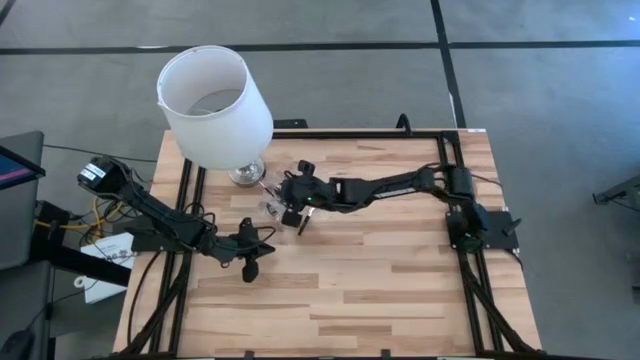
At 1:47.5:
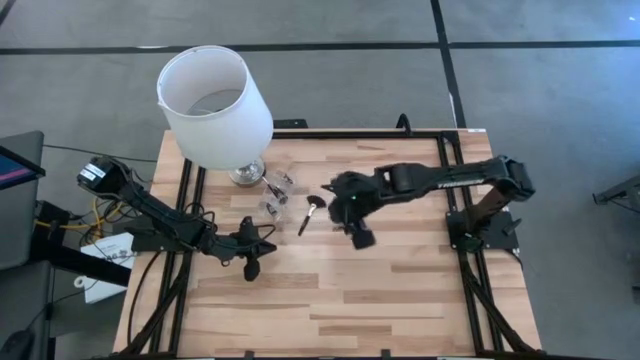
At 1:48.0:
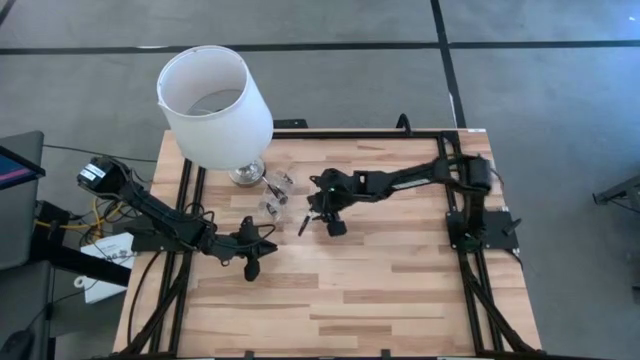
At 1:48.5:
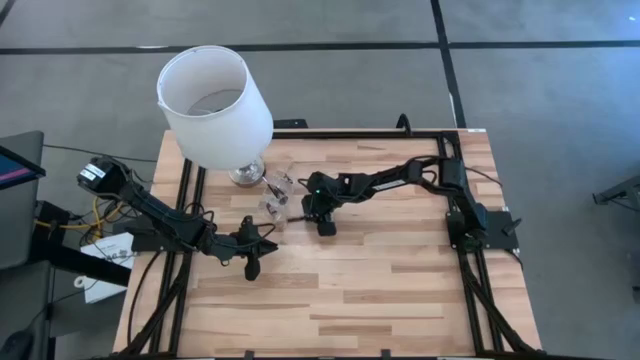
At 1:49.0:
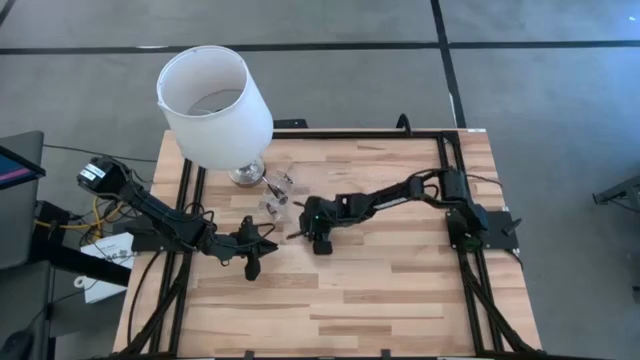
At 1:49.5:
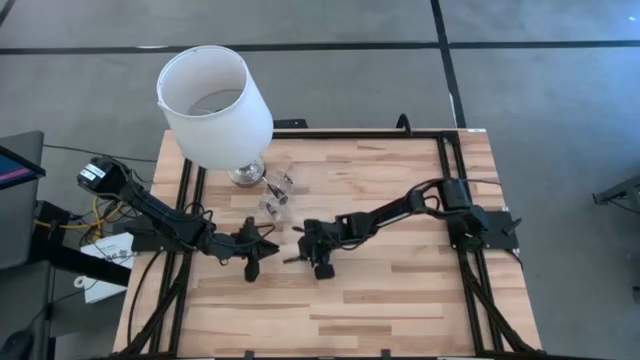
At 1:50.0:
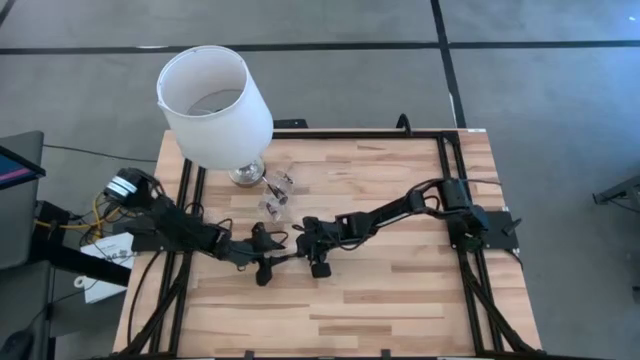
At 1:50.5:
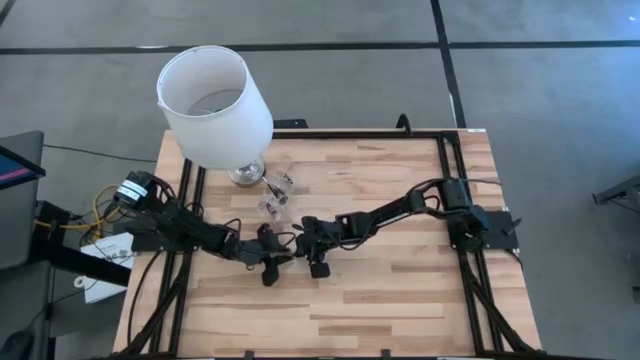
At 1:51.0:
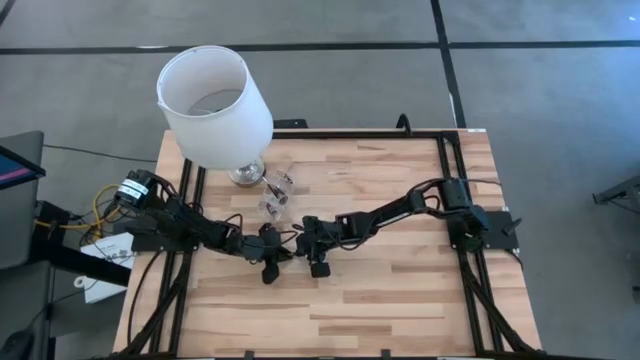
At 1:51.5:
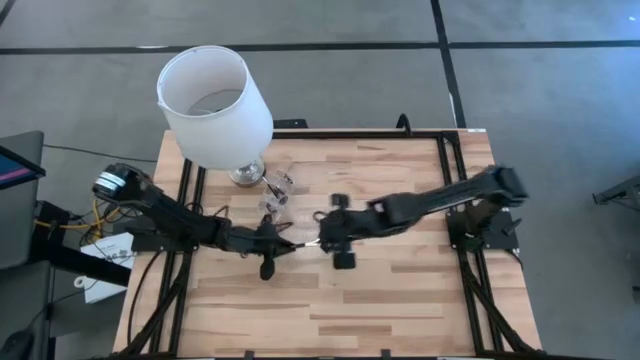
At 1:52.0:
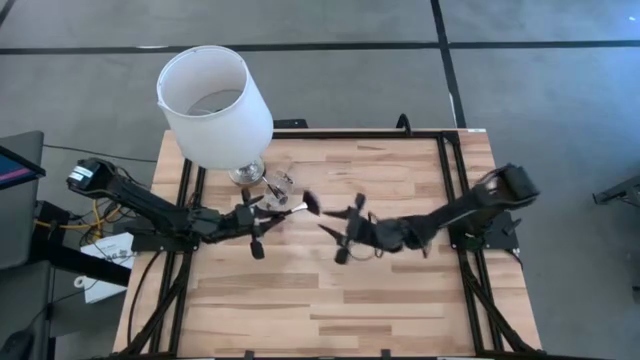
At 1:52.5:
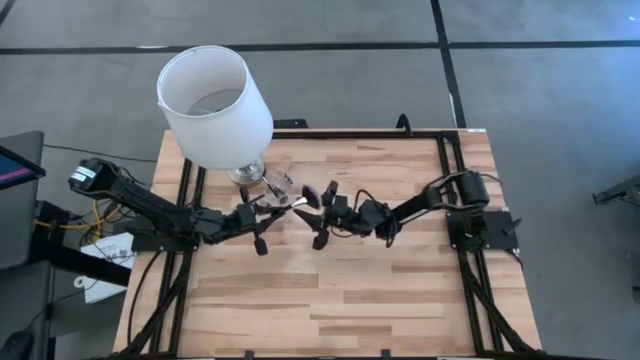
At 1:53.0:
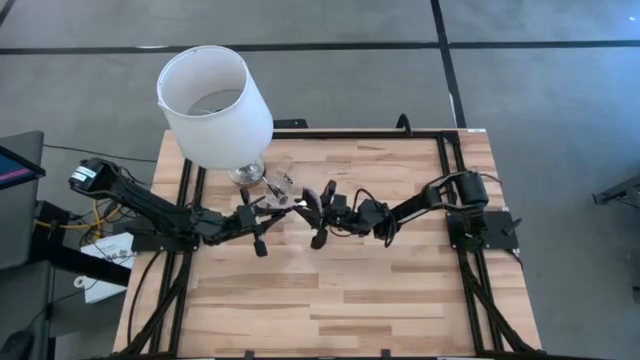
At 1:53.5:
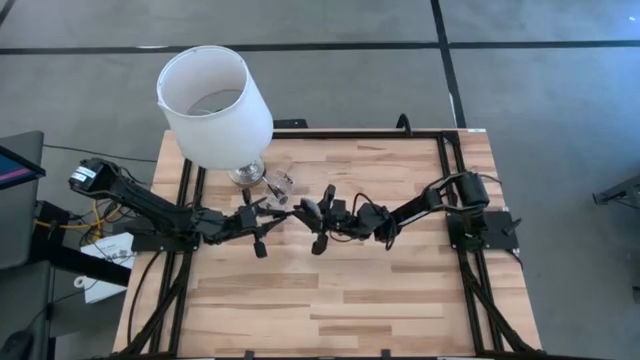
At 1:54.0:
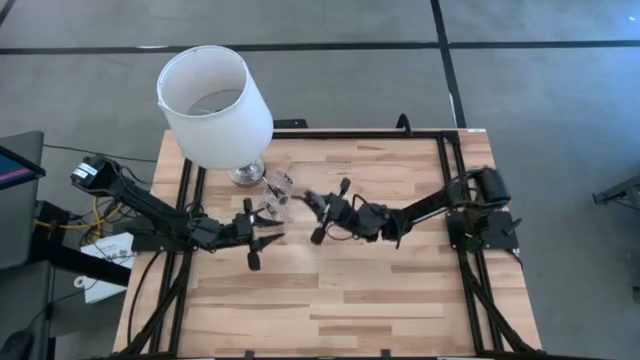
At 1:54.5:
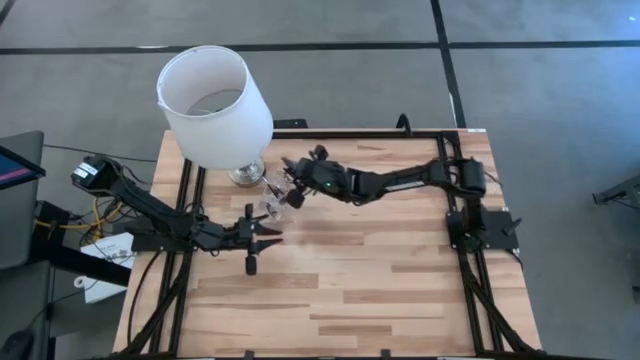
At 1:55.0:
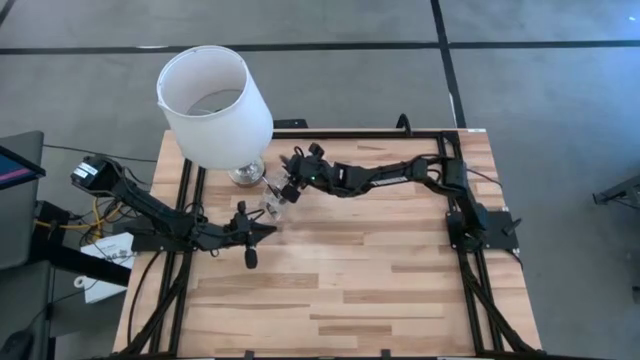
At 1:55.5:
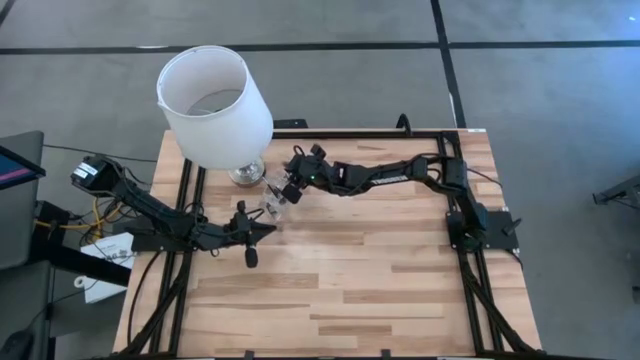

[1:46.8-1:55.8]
Task: Put items in baskets/containers
Put the black highlighter brush in the transparent organizer

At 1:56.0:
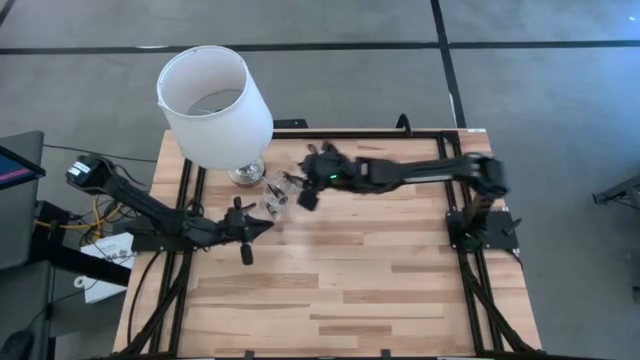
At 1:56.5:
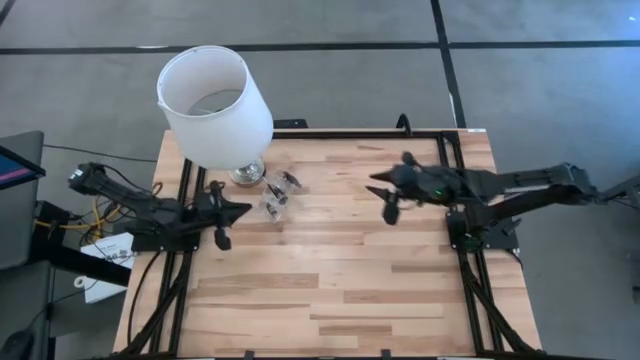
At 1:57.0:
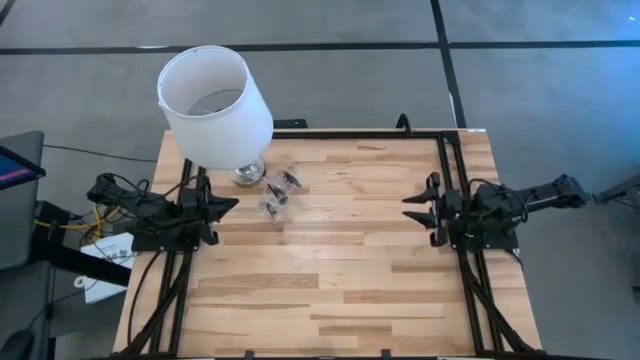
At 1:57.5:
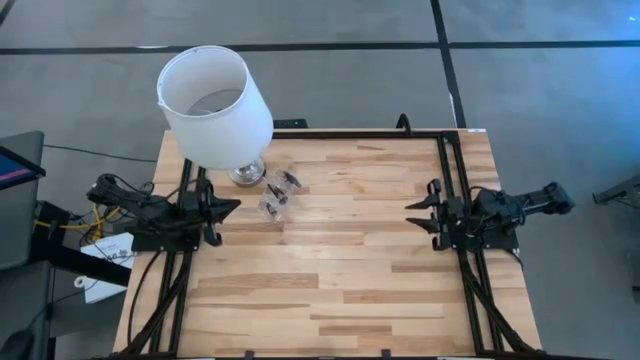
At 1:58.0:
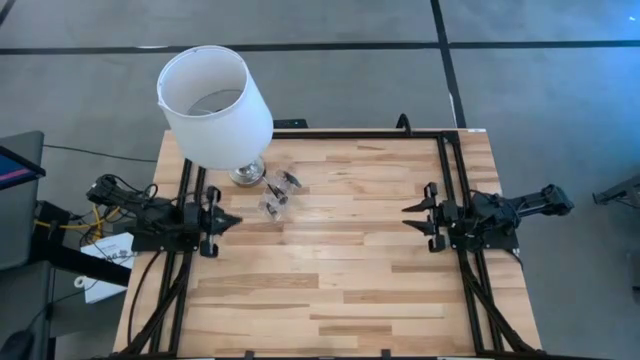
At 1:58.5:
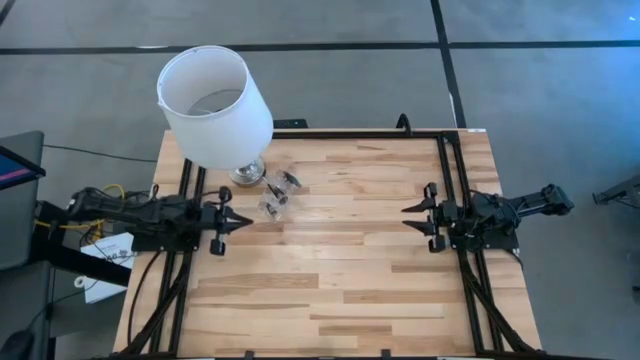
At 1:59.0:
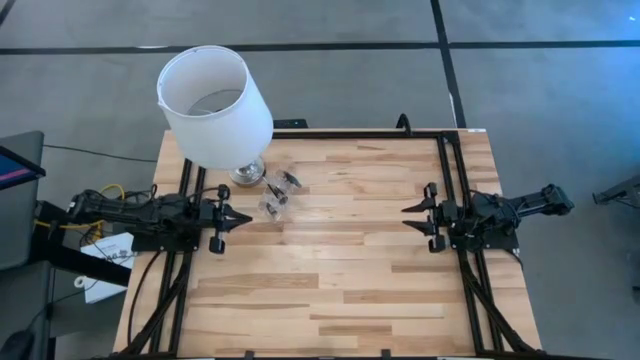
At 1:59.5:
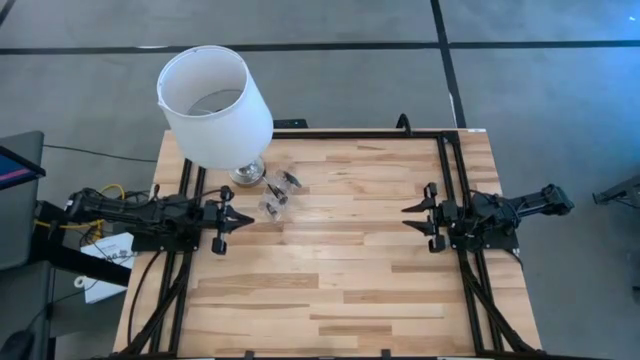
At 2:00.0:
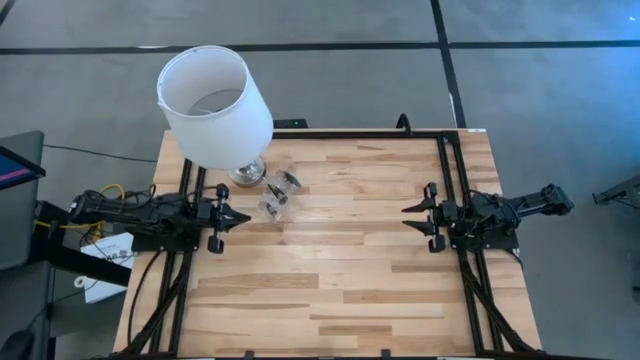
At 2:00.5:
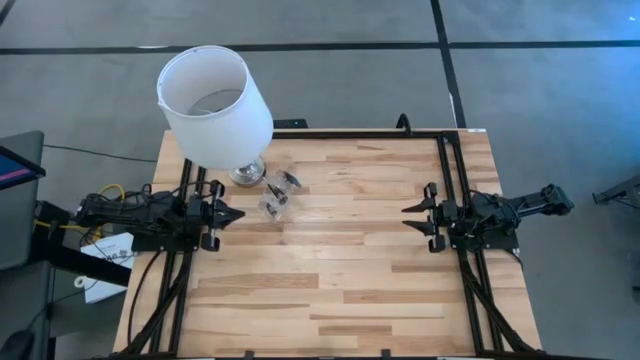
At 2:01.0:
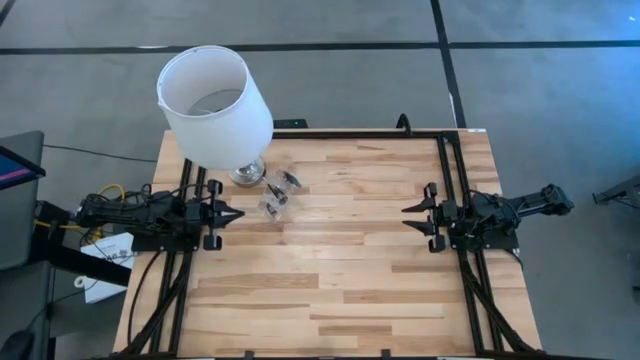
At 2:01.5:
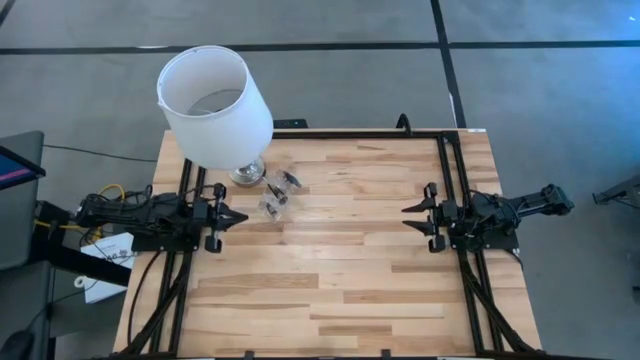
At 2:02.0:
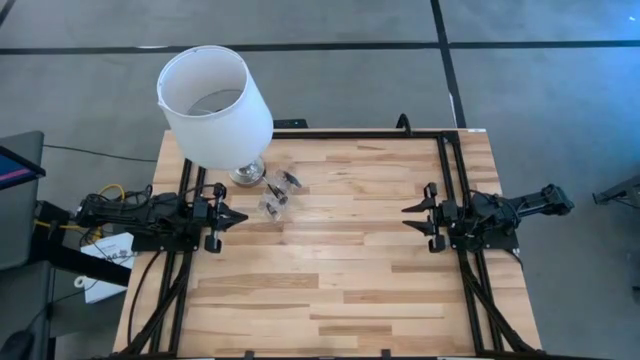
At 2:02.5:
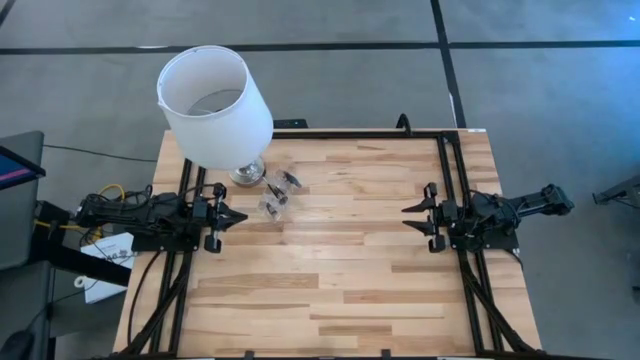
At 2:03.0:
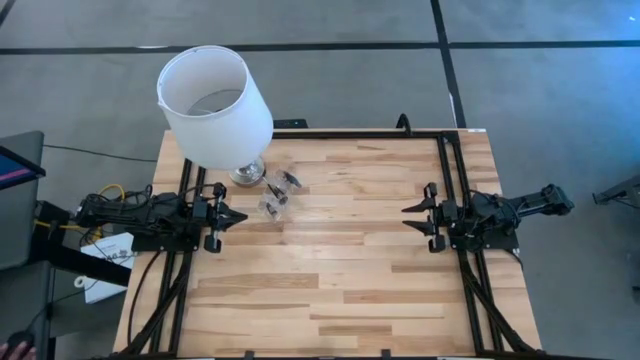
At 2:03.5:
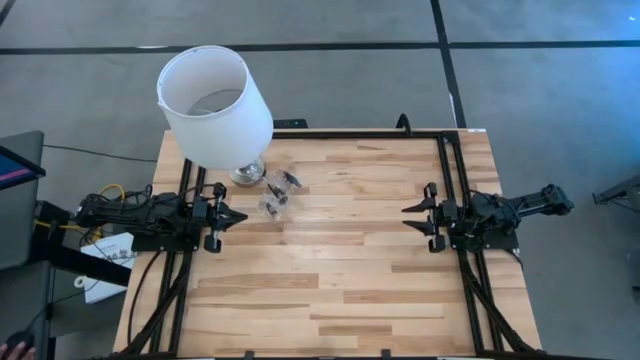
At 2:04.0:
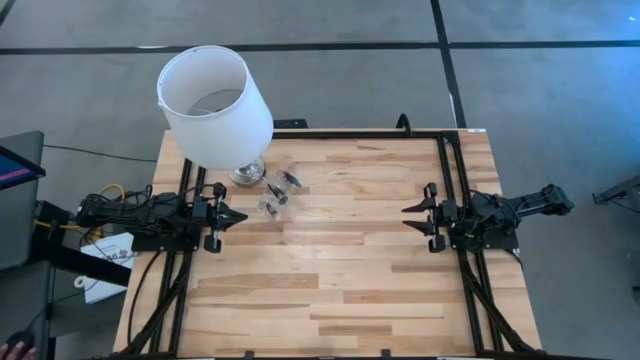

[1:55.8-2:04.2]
Return to Home Position

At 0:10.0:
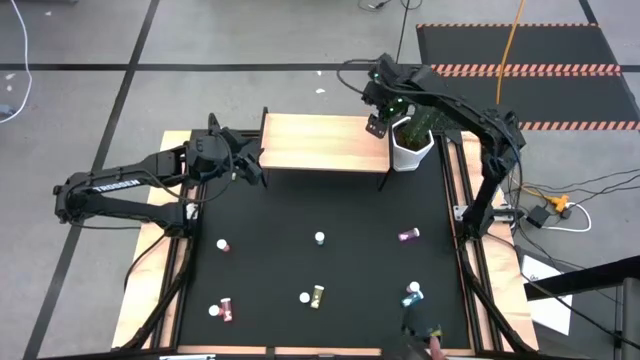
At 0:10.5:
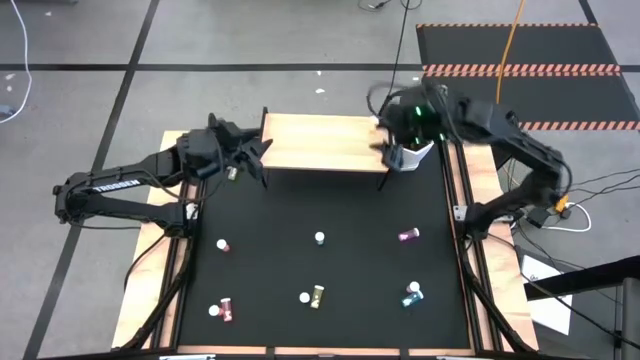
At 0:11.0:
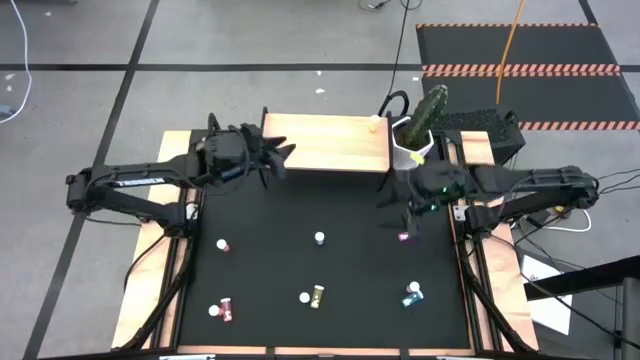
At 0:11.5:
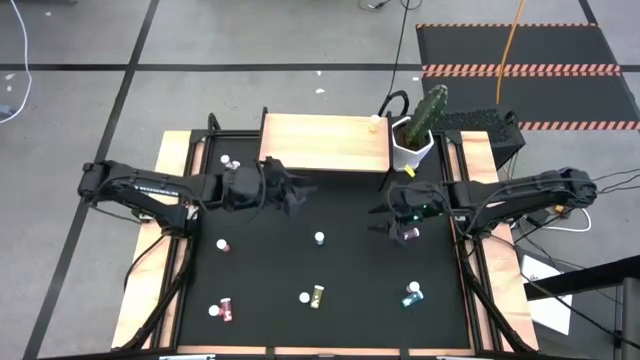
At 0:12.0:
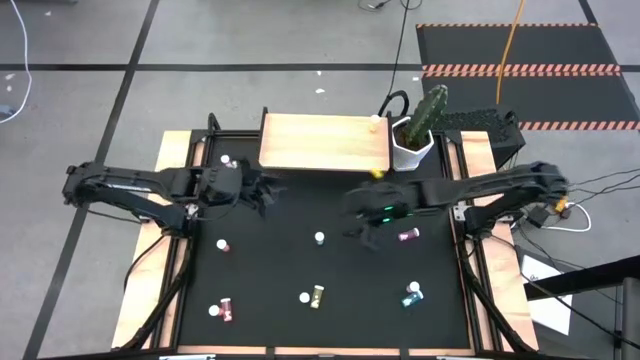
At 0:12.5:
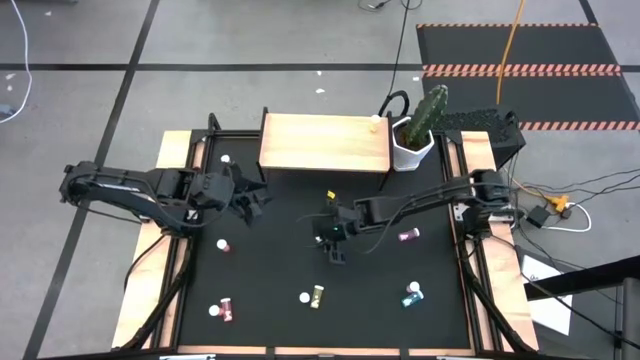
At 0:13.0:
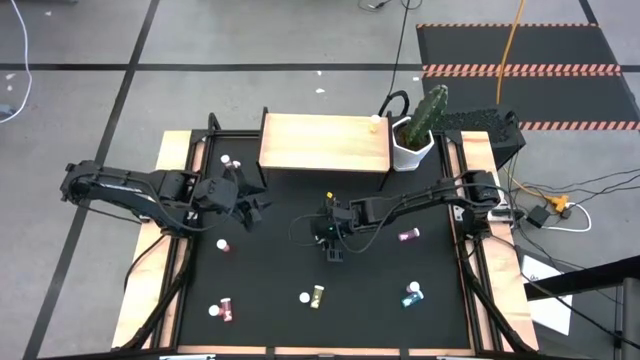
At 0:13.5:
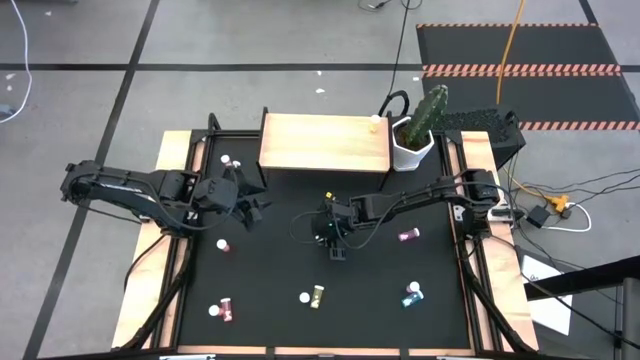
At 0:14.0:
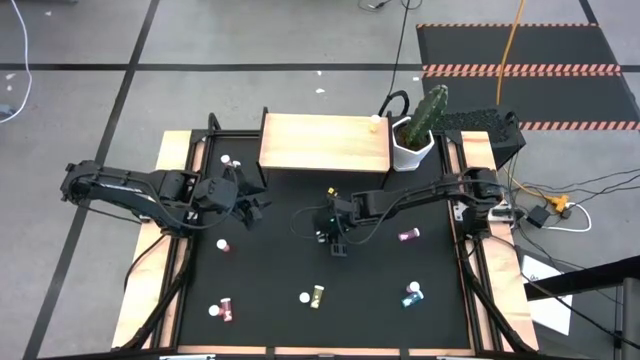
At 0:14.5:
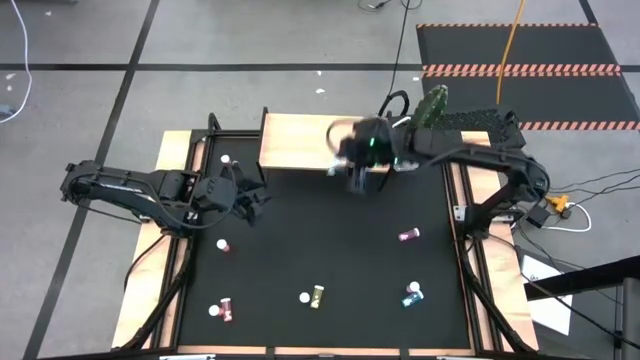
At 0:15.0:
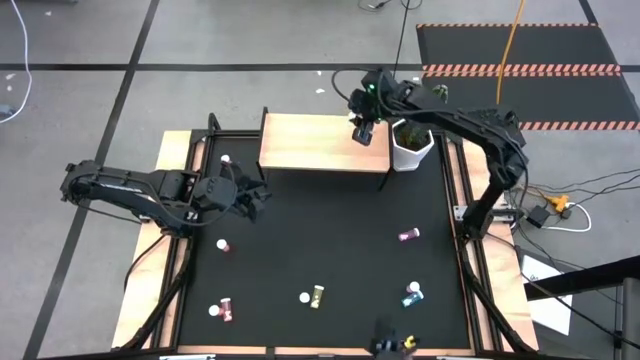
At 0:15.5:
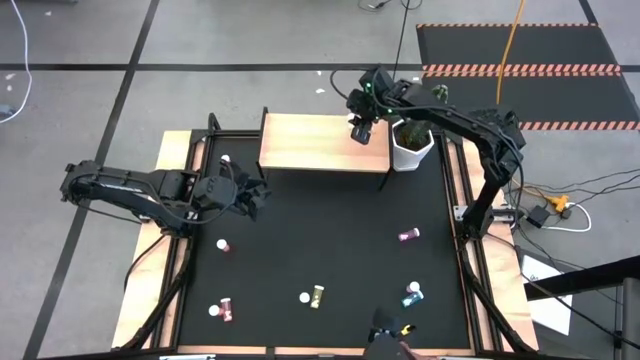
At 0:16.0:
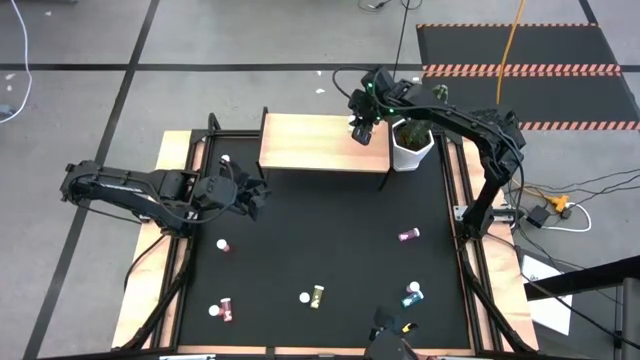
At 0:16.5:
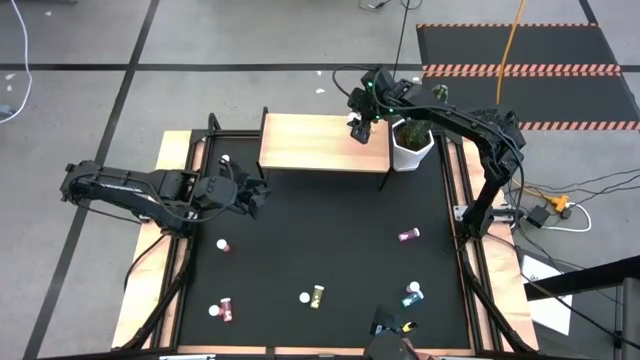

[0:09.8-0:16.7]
Task: Pick and place medicine bottles onto shelf by color
Put the top blue pill bottle on the shelf
